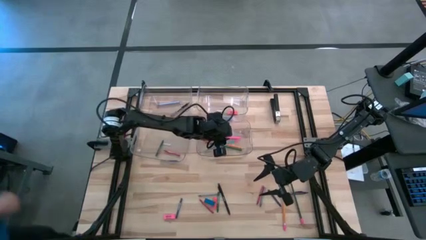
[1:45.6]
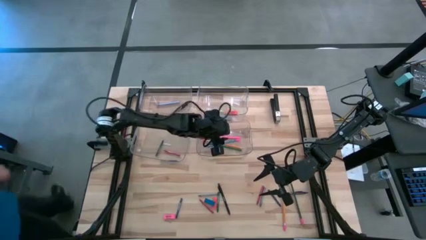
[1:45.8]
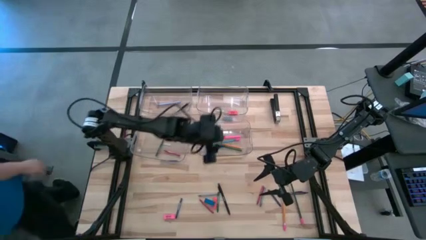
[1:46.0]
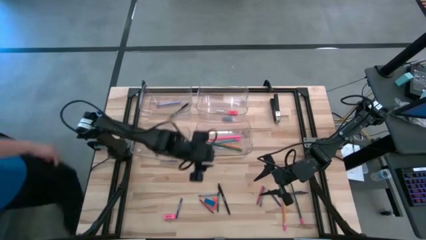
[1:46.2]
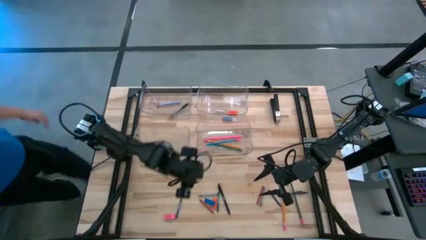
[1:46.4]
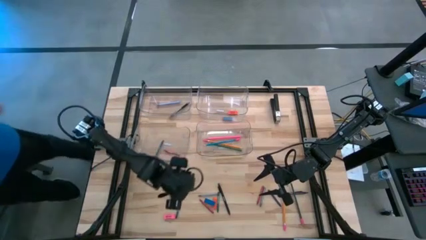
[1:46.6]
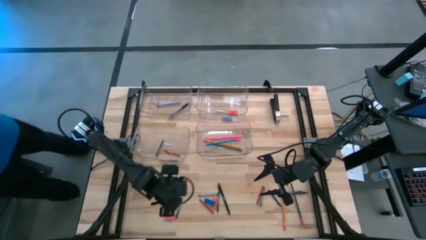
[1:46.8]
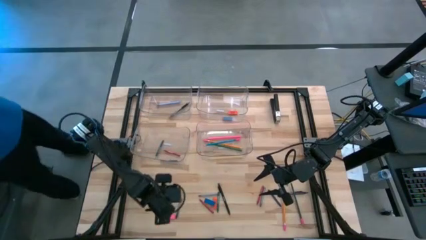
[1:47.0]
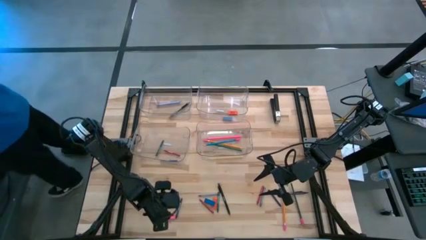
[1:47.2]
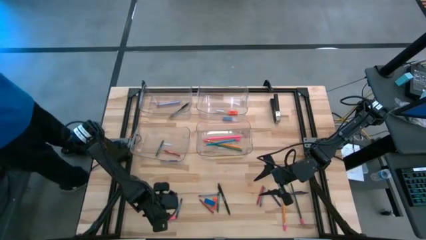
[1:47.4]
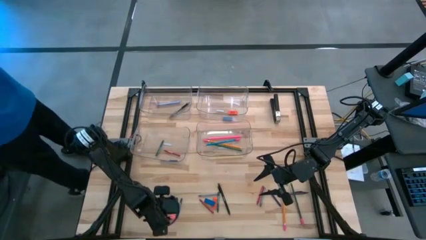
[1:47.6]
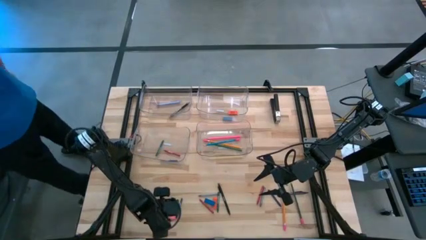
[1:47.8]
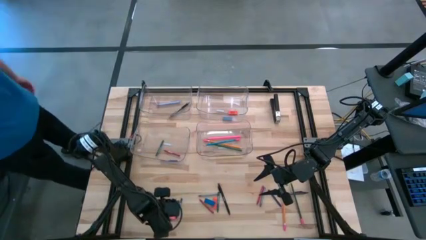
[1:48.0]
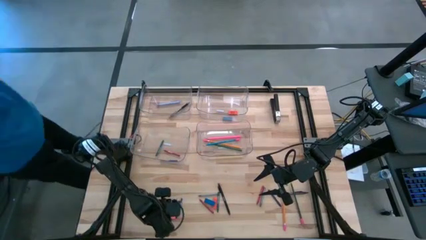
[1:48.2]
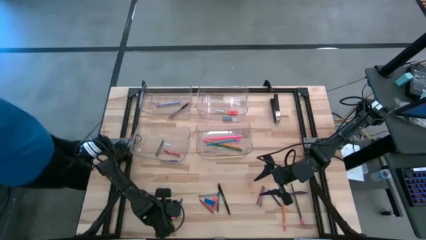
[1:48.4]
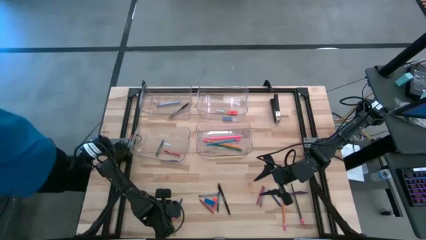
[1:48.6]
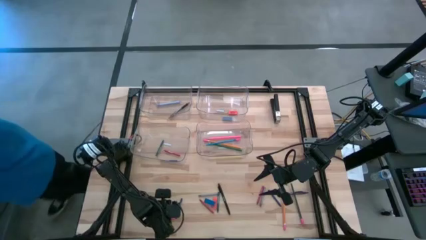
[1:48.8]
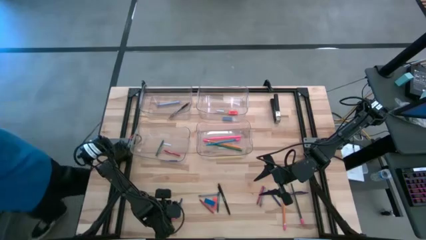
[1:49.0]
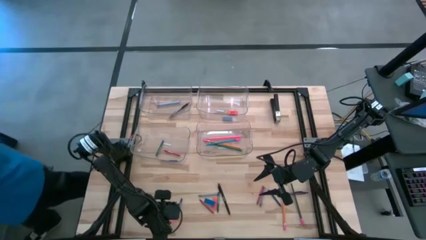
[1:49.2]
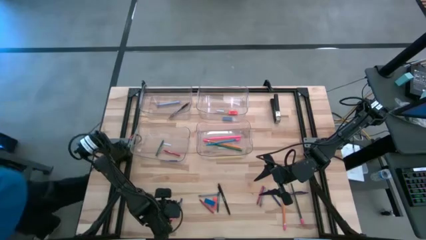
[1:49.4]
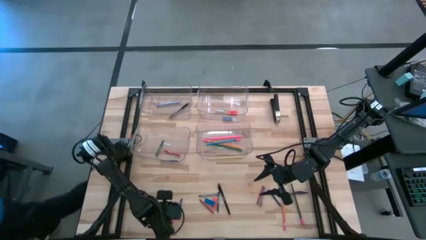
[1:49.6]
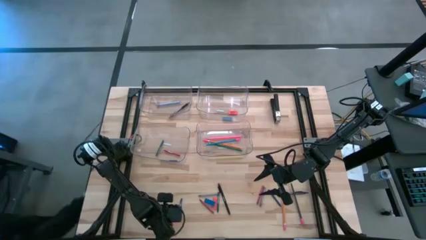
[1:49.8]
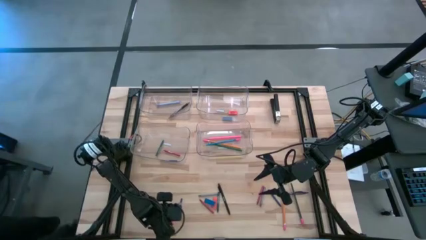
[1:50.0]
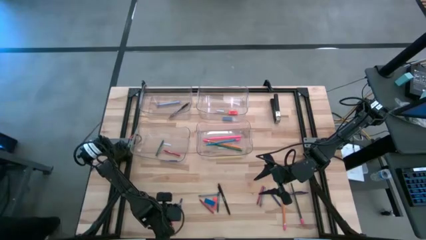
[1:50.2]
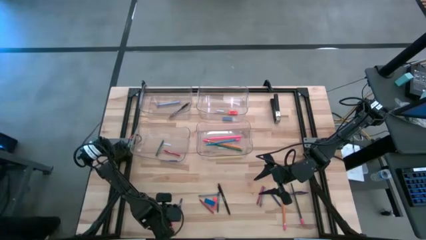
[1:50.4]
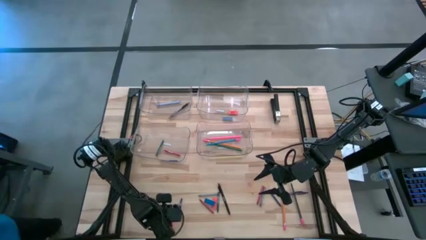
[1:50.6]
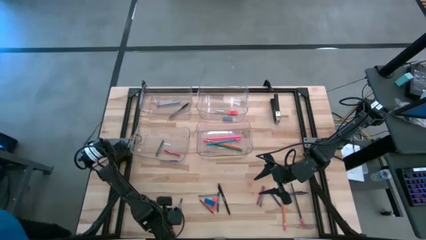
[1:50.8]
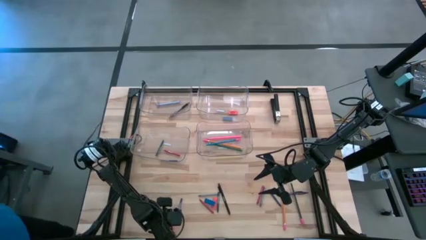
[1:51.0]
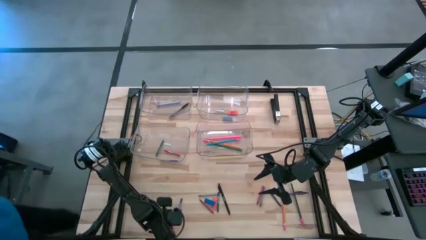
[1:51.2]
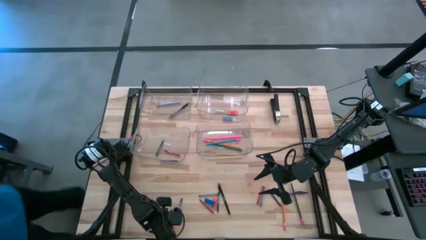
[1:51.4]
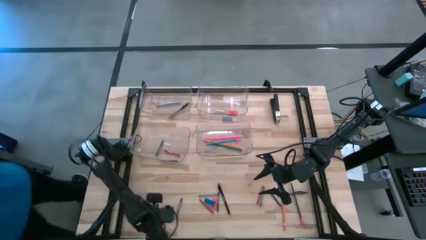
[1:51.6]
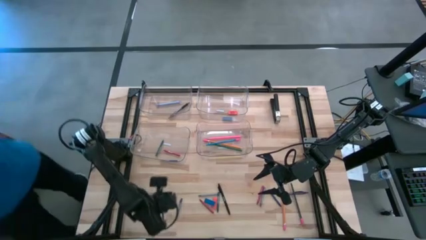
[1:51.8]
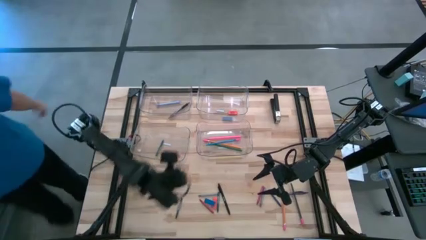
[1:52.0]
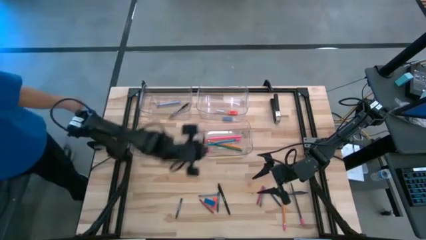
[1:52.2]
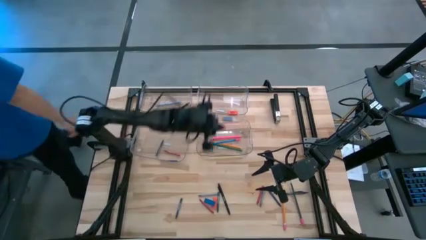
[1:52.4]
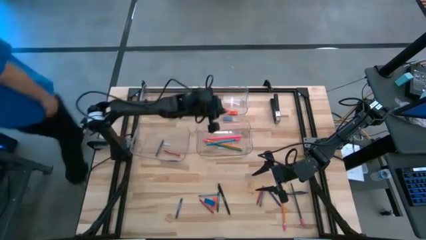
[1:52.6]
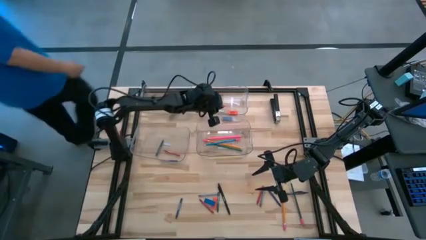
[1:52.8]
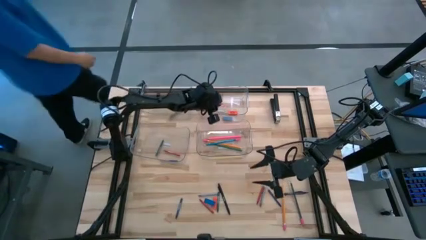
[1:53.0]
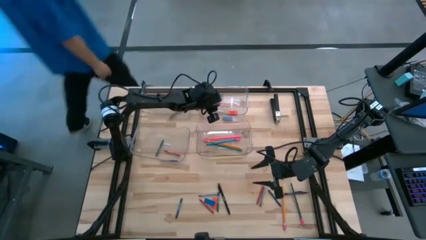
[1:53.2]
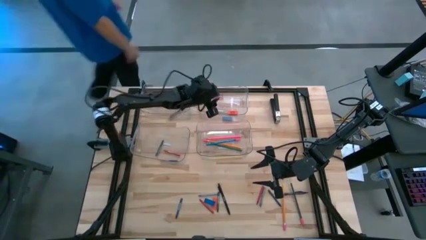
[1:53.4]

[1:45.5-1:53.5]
Task: Sort crayons/erasers/pens/pencils in bins
Put the pink eraser into the top right transparent bin

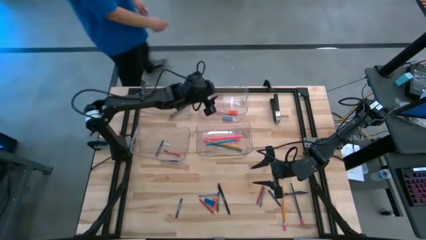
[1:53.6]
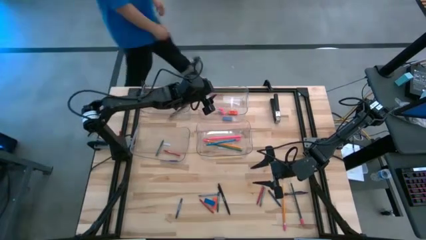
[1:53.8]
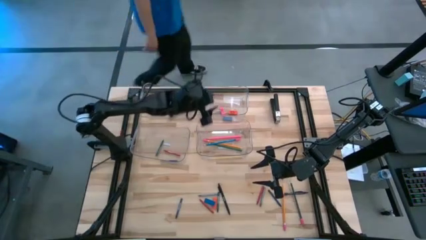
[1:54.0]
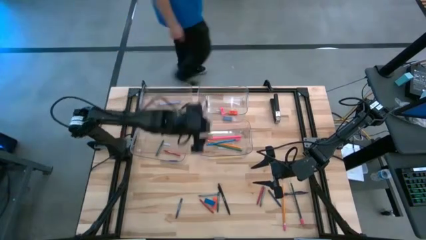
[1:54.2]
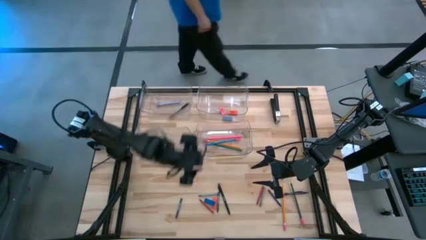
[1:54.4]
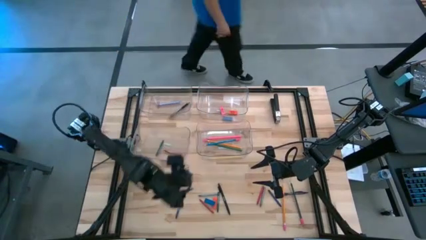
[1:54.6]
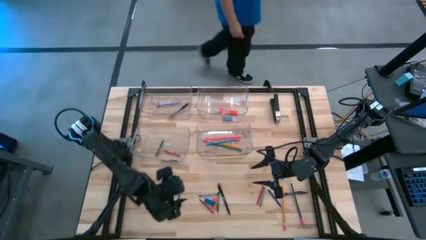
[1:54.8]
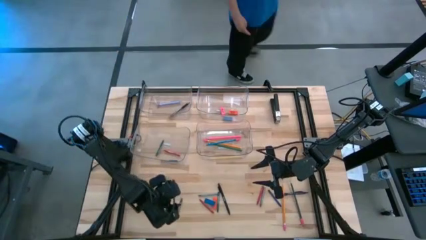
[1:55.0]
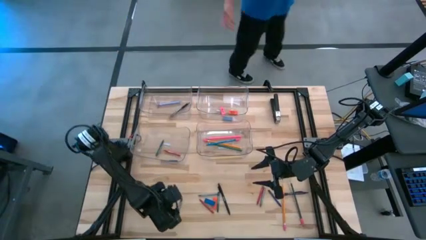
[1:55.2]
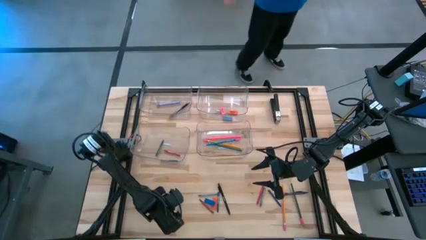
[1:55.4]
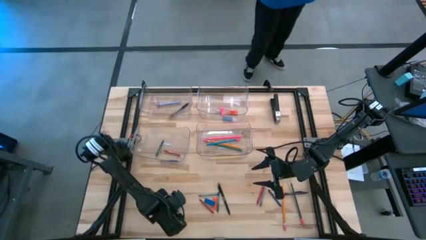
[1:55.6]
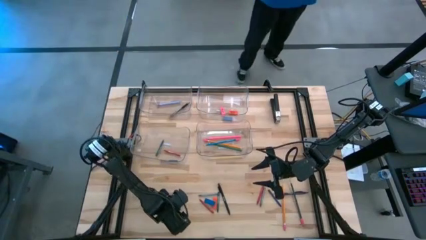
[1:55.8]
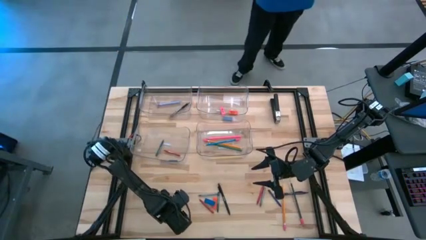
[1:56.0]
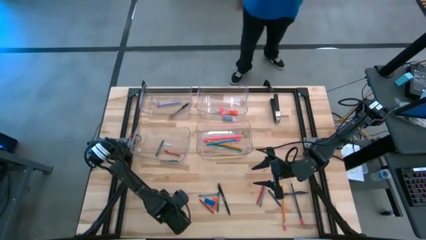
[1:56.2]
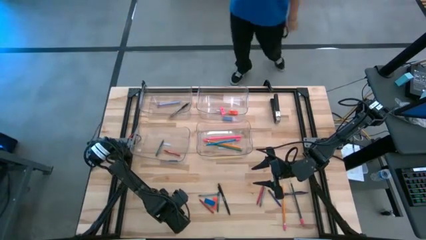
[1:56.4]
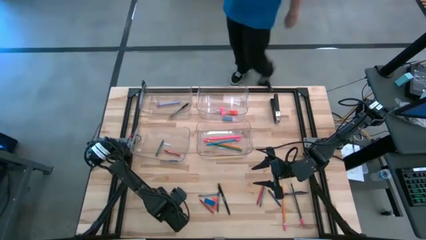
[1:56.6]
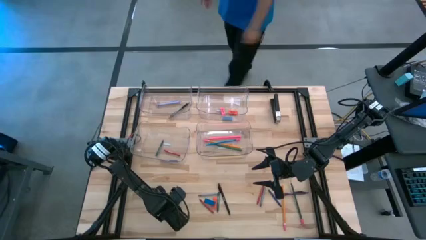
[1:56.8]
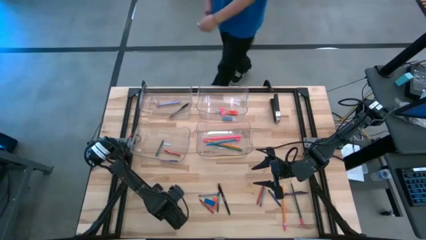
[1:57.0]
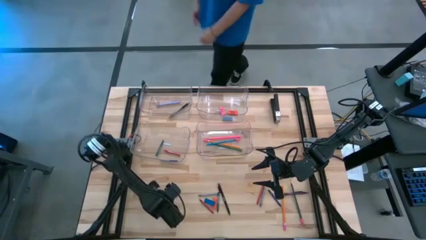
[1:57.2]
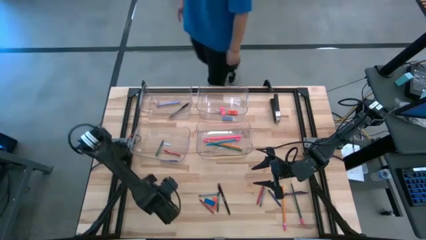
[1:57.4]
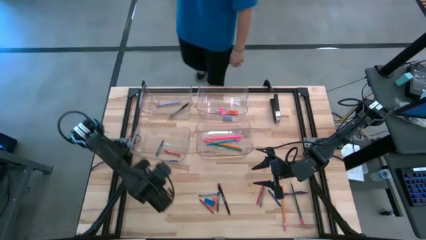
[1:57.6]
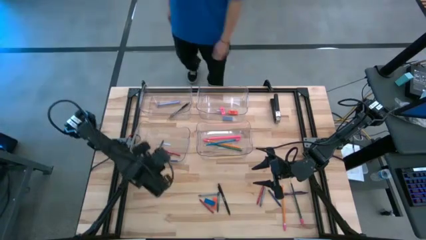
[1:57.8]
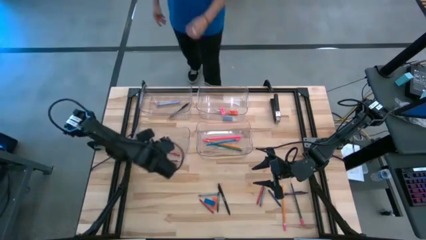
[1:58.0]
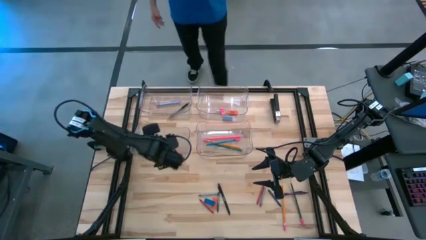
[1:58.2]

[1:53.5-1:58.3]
Put the left blue crayon into the bottom left transparent bin

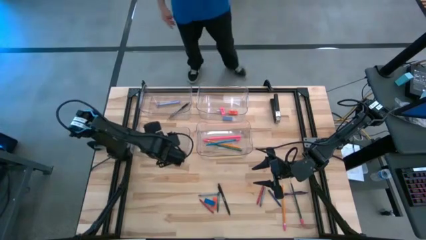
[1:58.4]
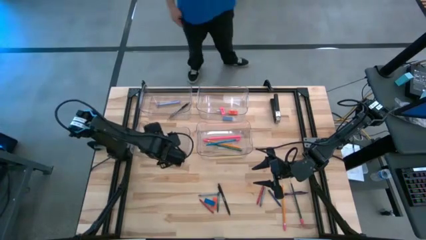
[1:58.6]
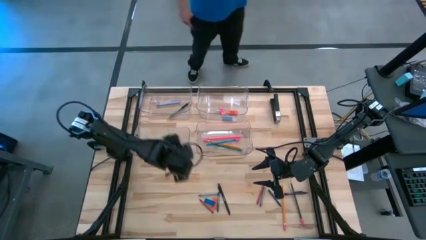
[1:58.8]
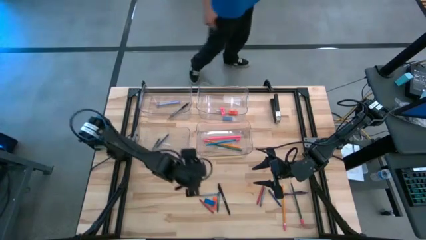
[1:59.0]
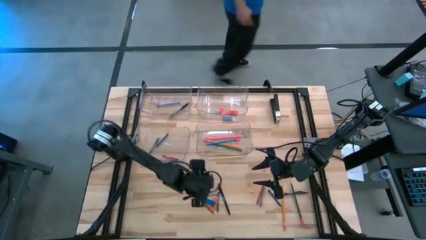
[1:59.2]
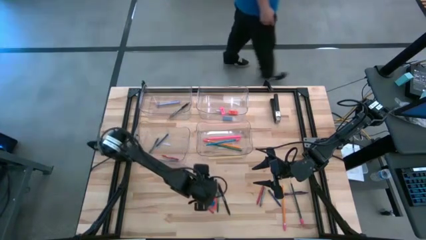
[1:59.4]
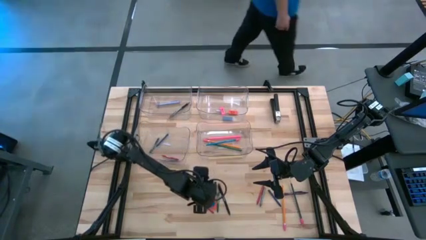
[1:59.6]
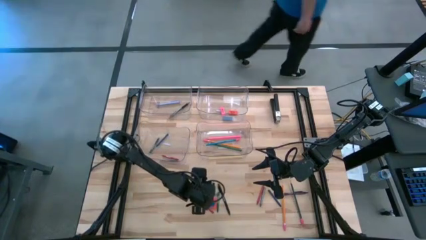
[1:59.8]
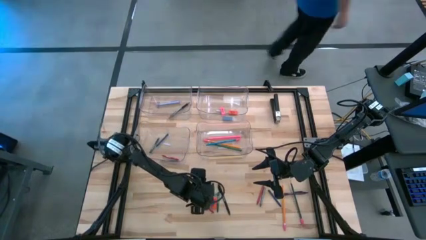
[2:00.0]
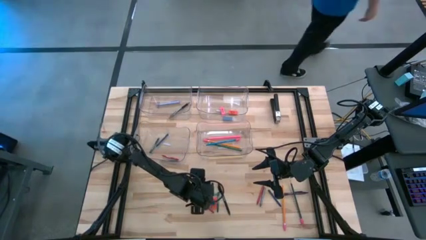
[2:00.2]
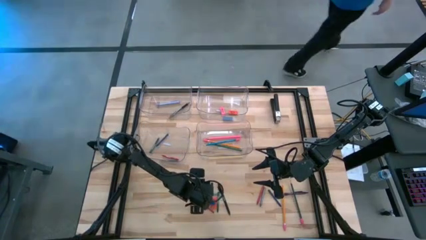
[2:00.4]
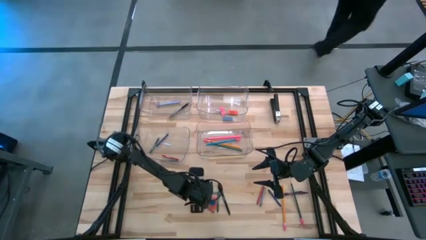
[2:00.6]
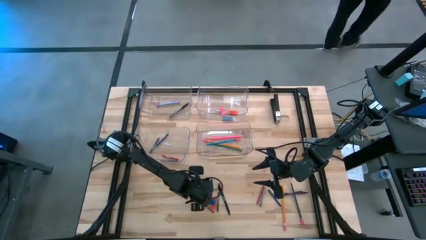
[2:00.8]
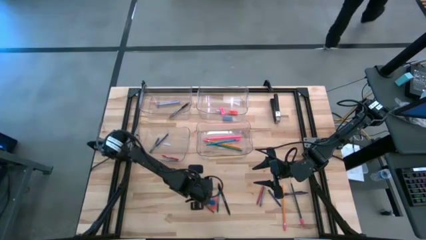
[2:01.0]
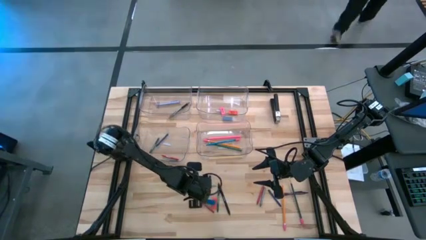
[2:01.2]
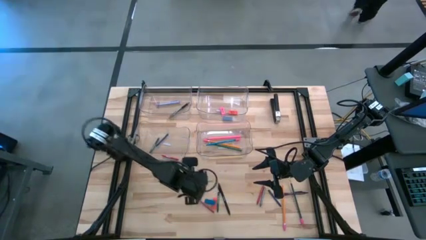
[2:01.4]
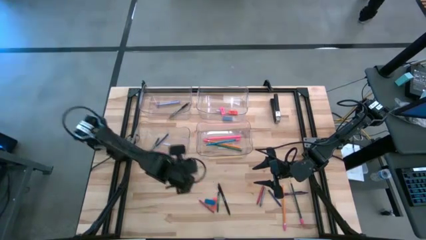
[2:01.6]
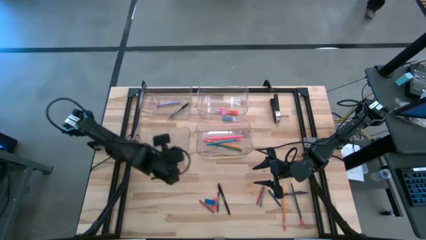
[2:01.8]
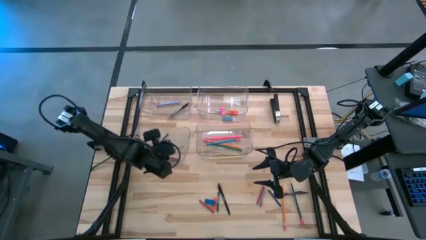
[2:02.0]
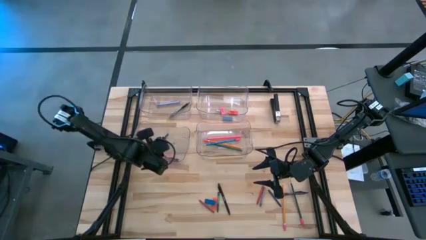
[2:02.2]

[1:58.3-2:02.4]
Put the left gray crayon into the bottom left transparent bin
